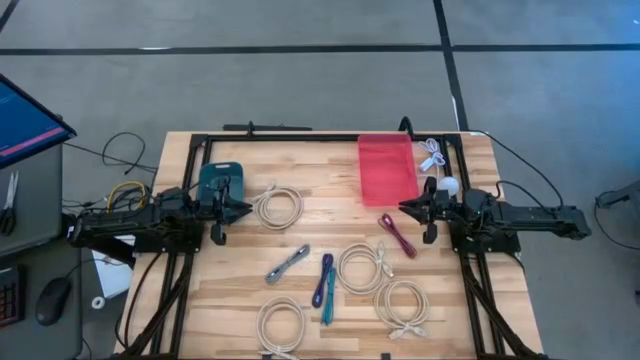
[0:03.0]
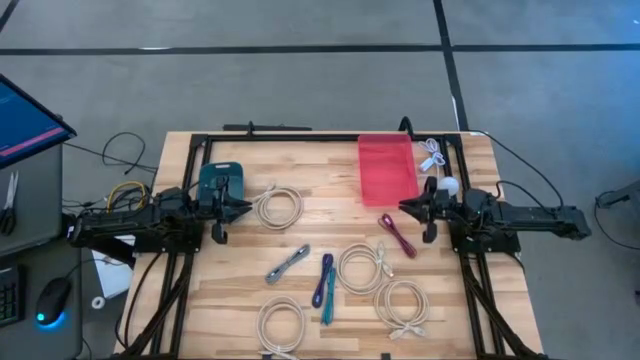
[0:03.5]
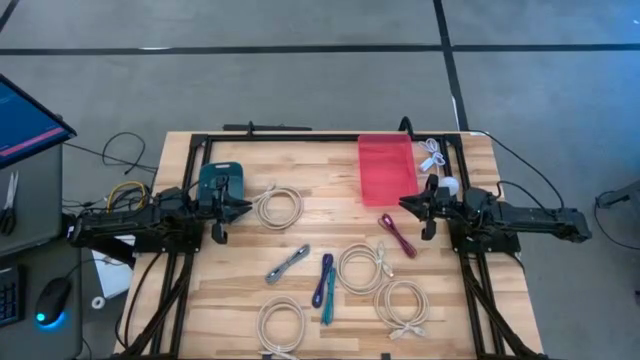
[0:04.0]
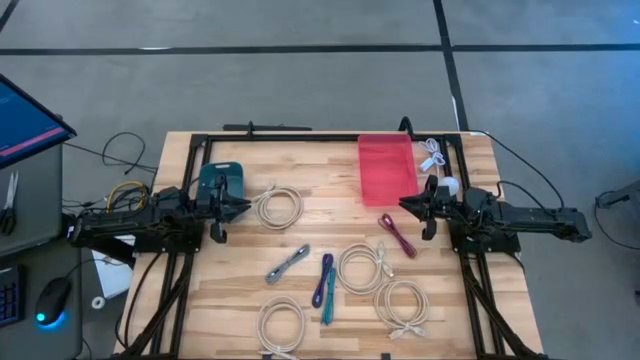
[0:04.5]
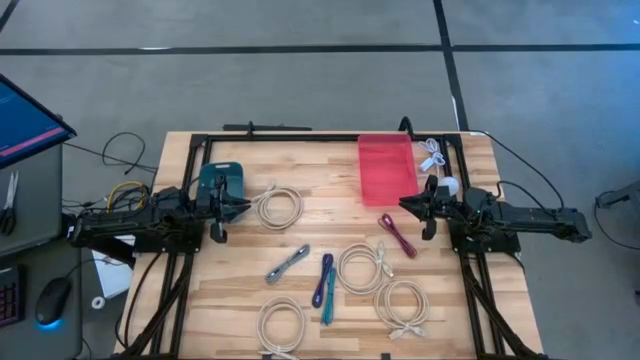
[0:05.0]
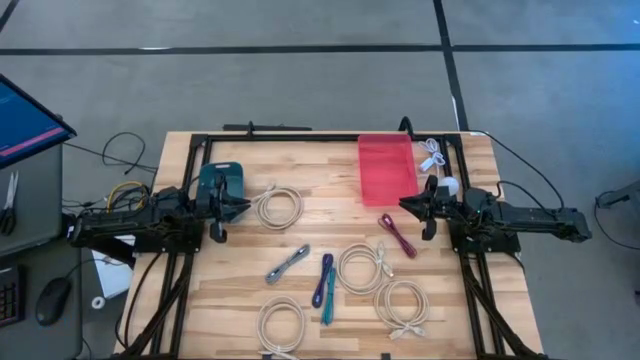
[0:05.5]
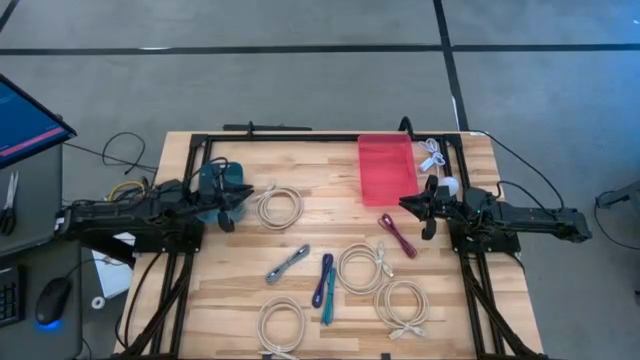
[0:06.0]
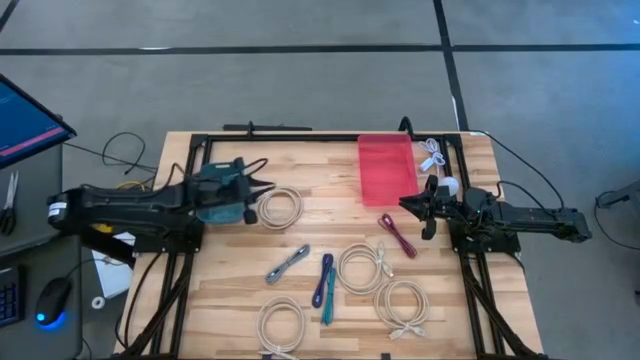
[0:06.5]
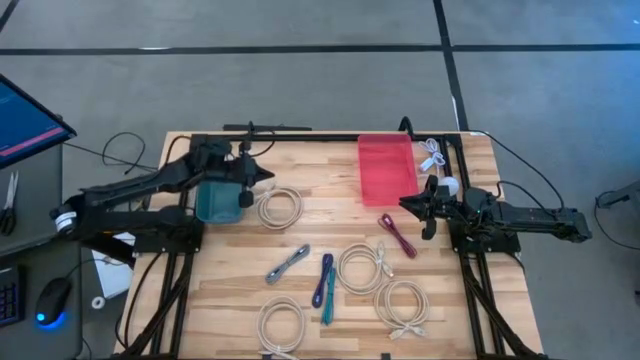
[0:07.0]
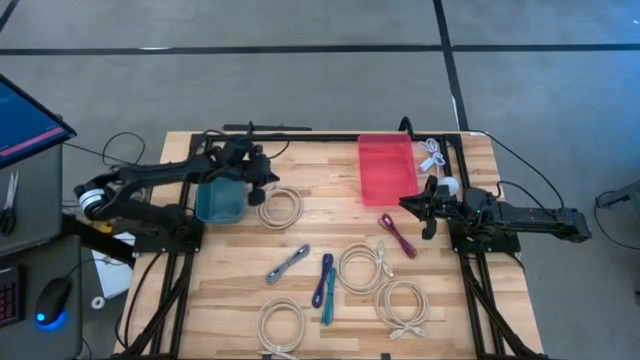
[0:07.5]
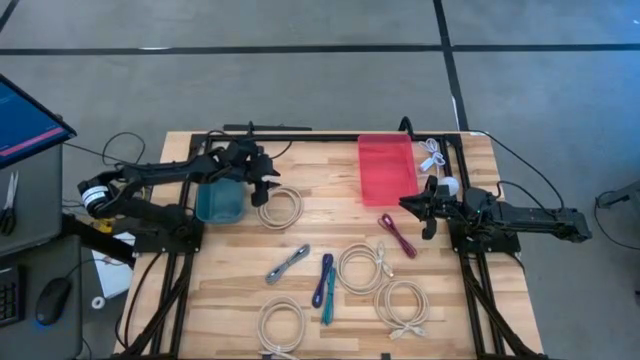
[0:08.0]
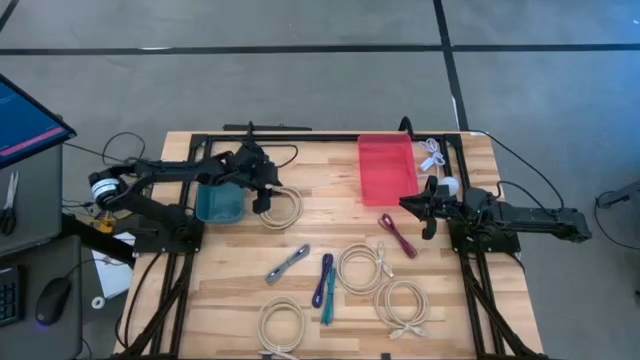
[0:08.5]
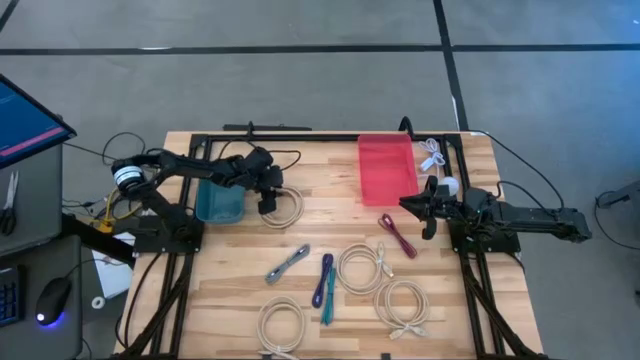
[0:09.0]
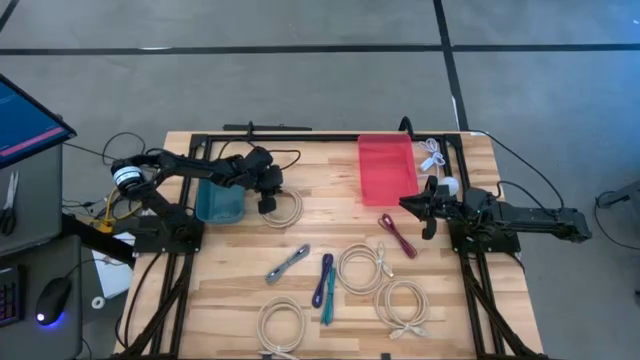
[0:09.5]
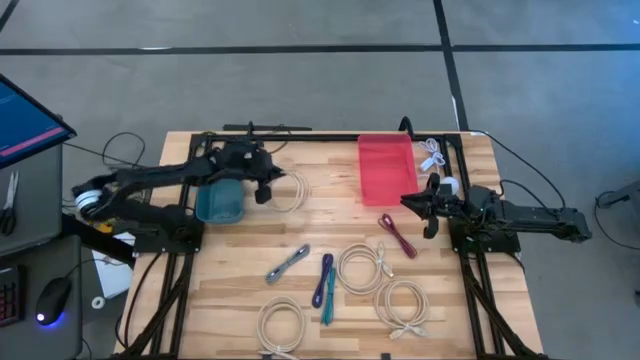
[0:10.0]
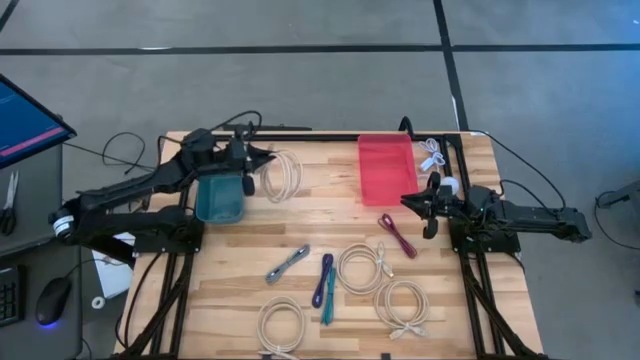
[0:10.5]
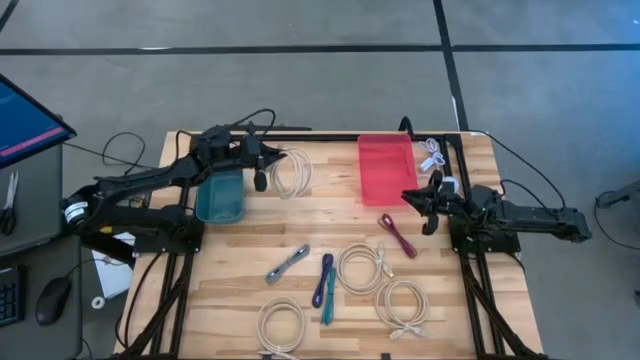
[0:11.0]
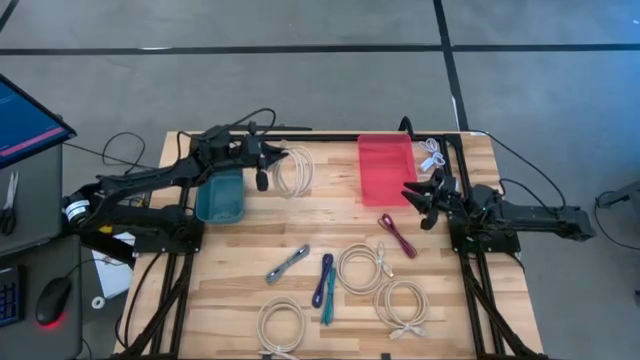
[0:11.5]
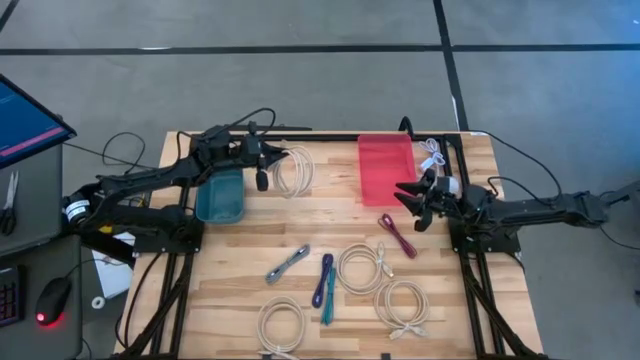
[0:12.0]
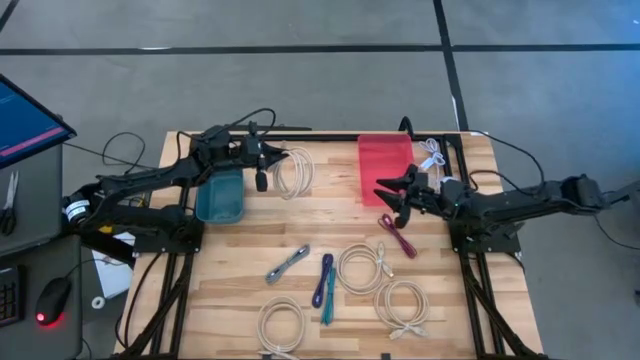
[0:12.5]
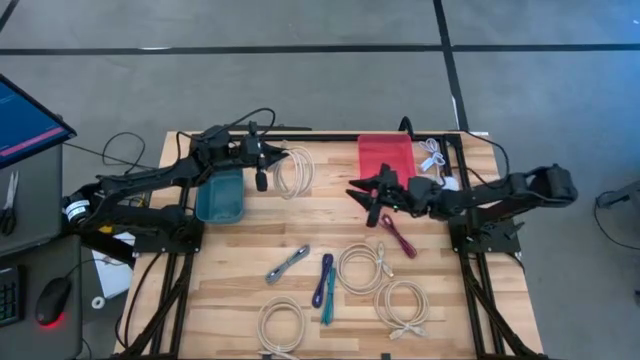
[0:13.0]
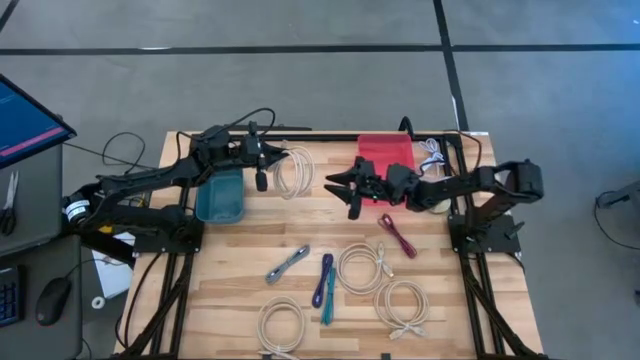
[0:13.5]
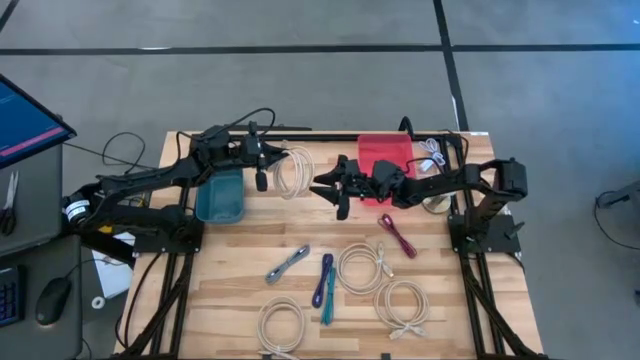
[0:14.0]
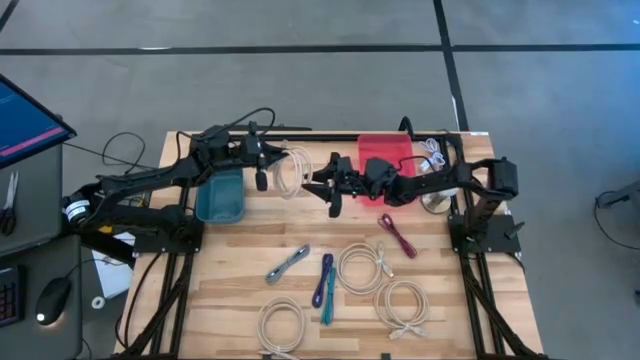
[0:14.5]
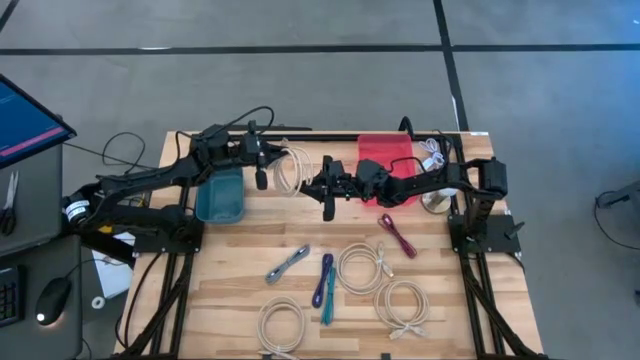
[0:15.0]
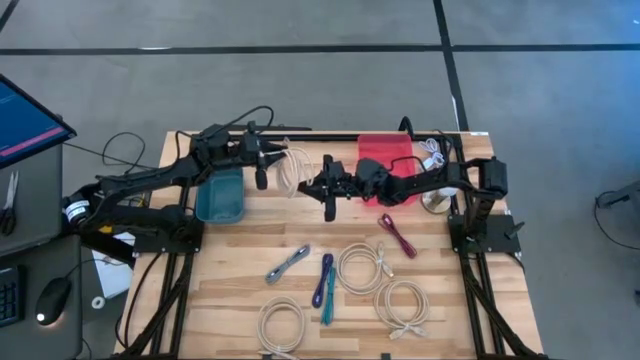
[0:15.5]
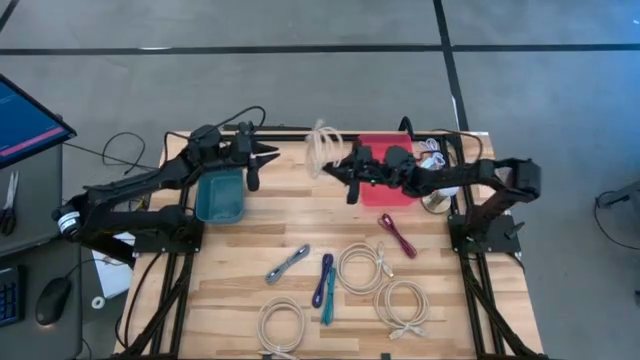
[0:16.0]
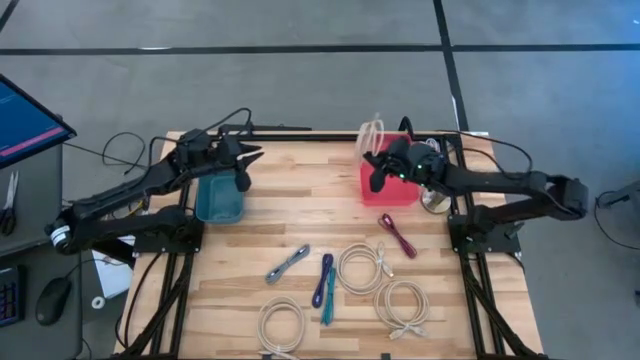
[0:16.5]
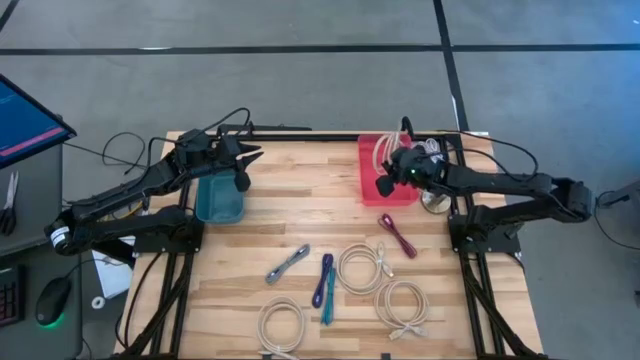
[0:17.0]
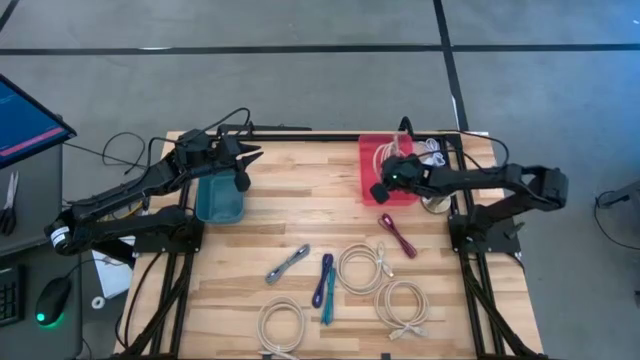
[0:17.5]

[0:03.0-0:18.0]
Task: Pick & Place USB Port
Put the brown display cable in the pink bin
